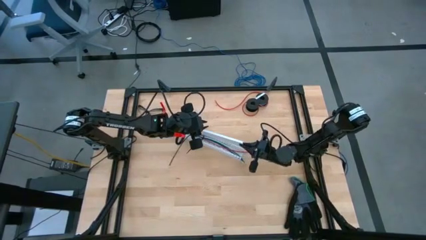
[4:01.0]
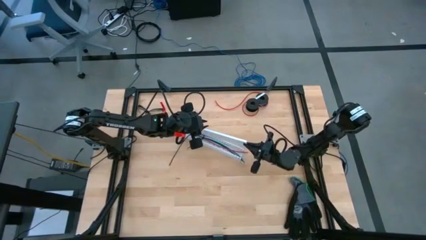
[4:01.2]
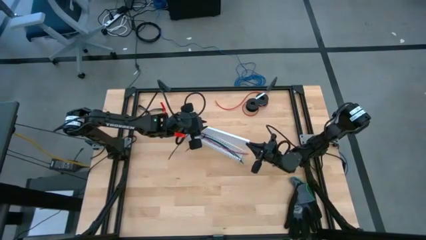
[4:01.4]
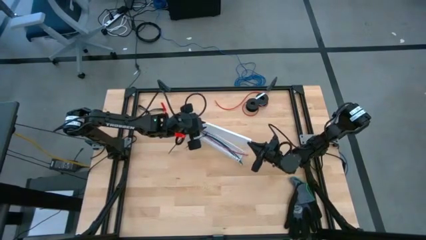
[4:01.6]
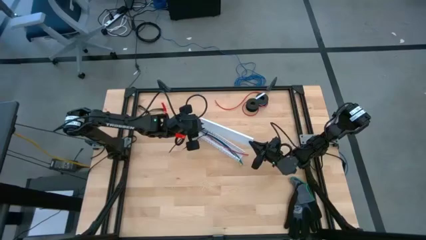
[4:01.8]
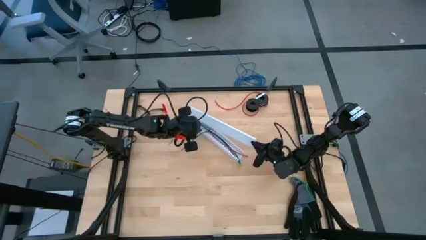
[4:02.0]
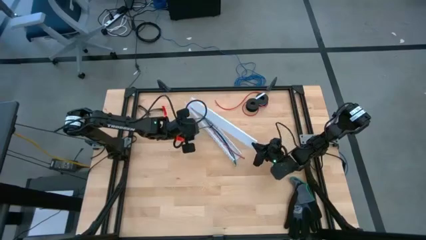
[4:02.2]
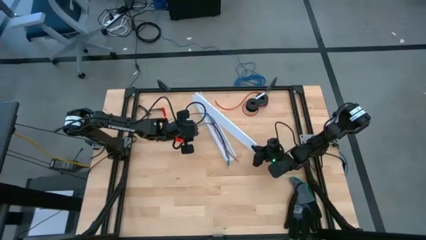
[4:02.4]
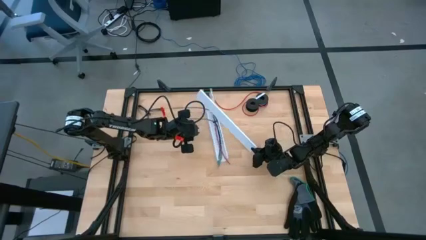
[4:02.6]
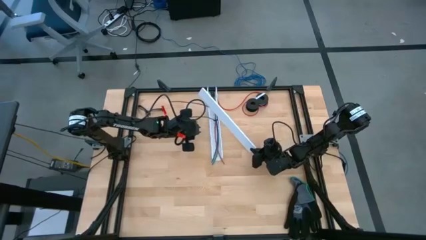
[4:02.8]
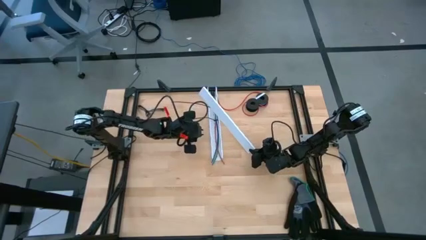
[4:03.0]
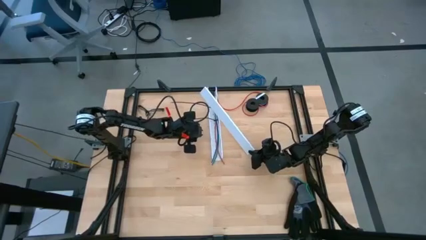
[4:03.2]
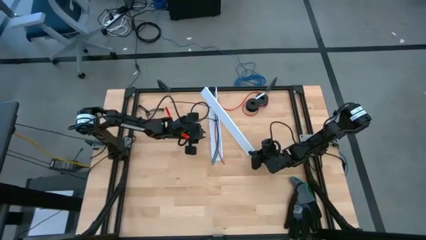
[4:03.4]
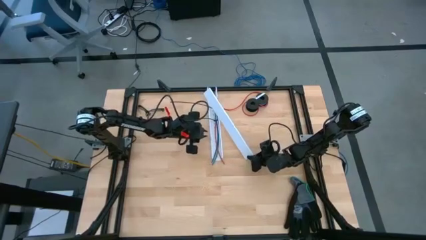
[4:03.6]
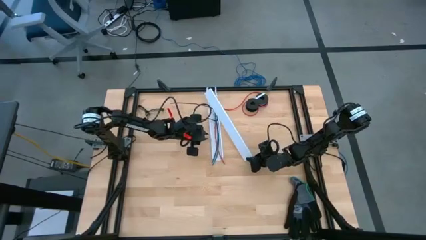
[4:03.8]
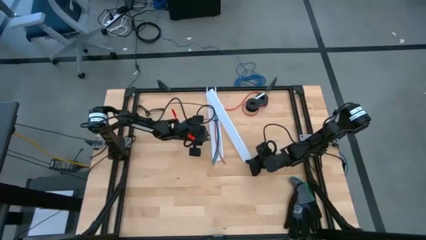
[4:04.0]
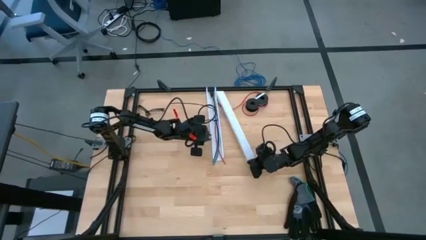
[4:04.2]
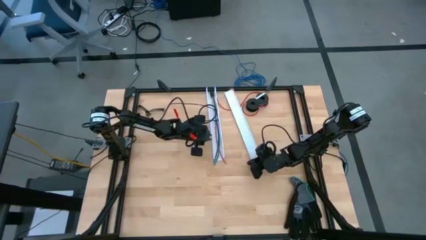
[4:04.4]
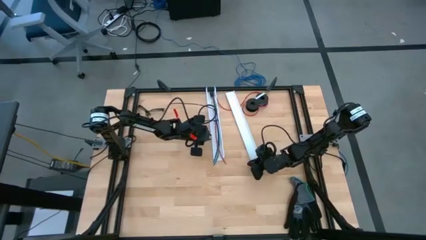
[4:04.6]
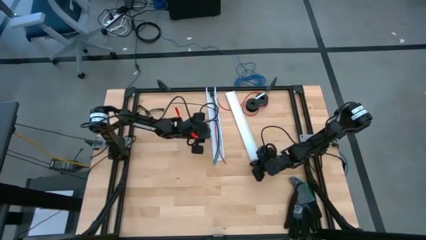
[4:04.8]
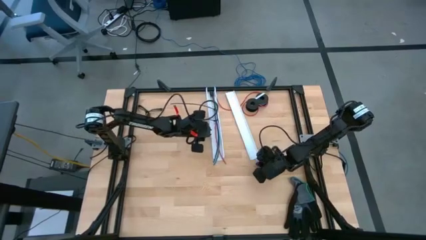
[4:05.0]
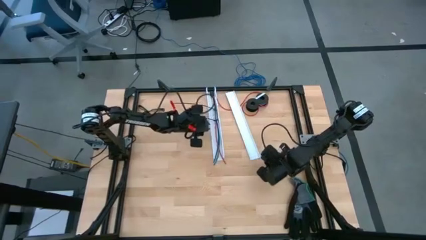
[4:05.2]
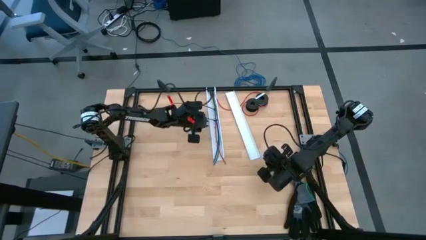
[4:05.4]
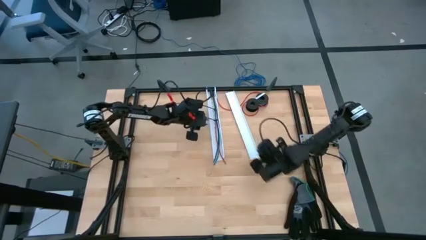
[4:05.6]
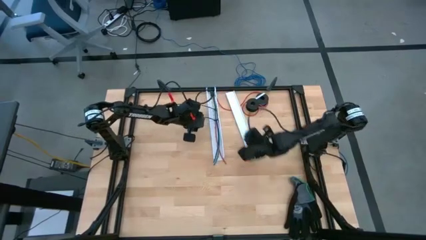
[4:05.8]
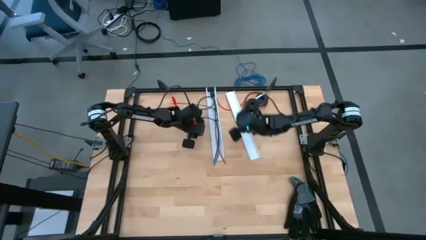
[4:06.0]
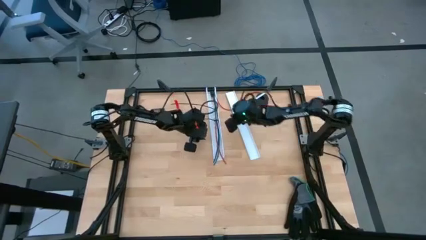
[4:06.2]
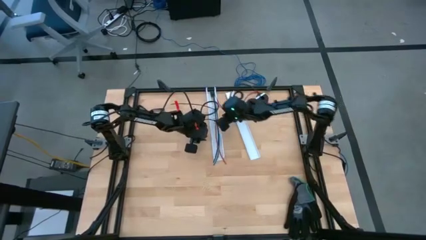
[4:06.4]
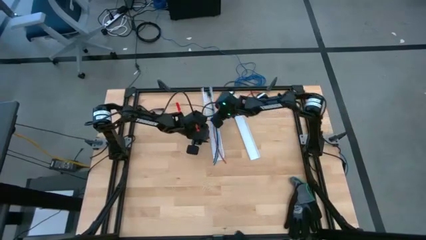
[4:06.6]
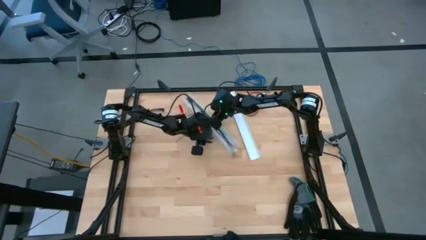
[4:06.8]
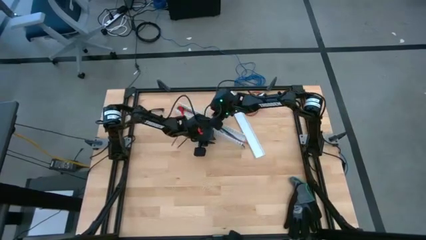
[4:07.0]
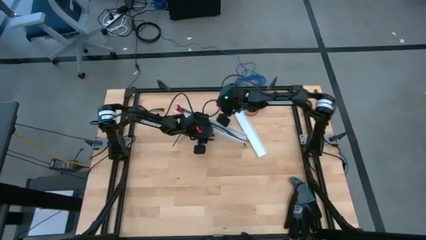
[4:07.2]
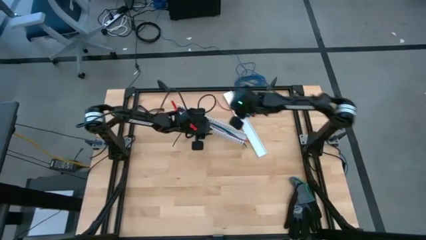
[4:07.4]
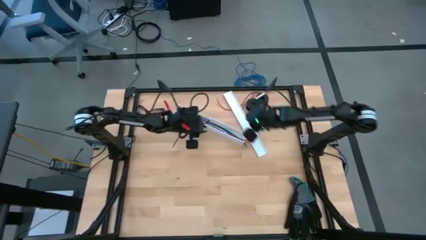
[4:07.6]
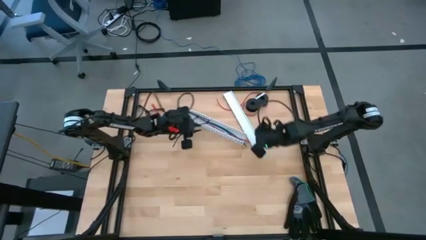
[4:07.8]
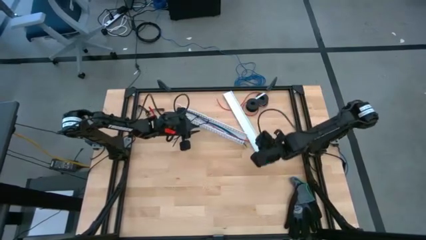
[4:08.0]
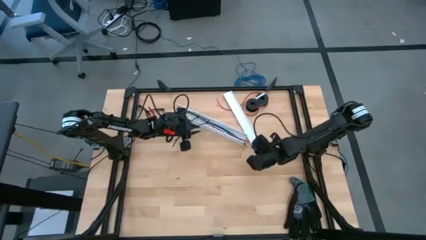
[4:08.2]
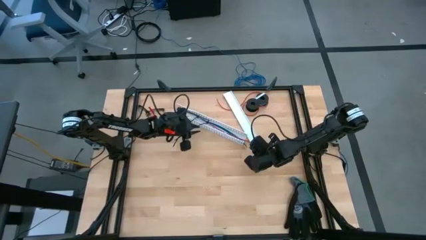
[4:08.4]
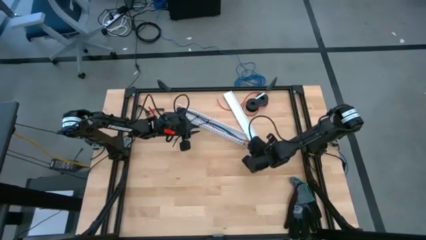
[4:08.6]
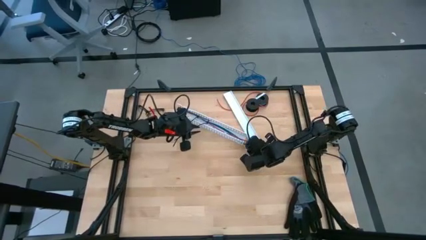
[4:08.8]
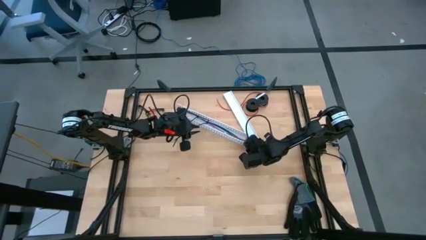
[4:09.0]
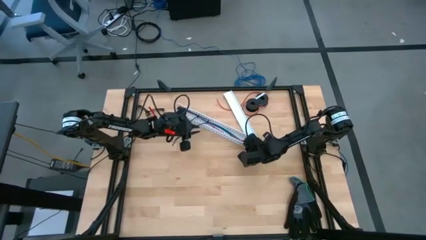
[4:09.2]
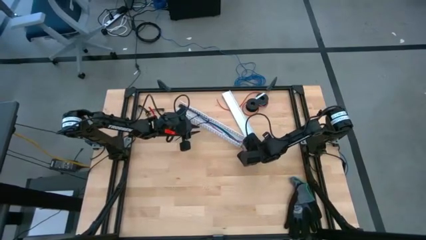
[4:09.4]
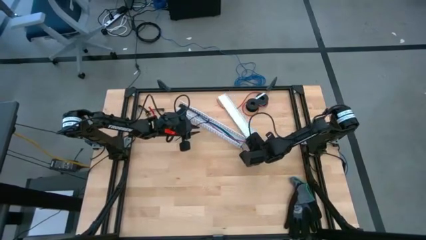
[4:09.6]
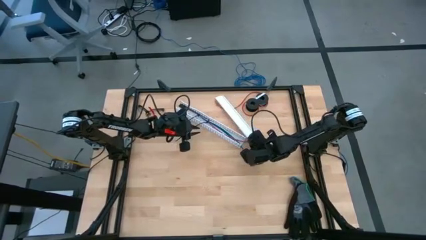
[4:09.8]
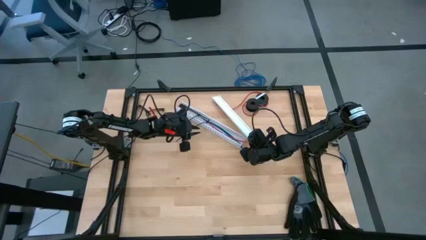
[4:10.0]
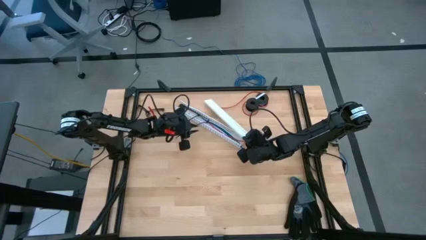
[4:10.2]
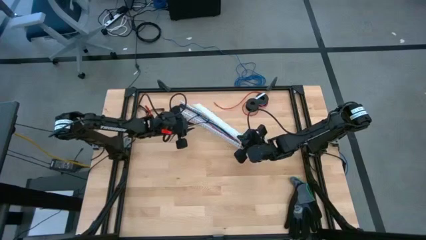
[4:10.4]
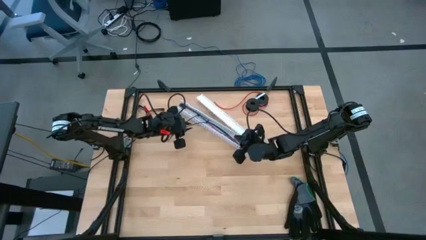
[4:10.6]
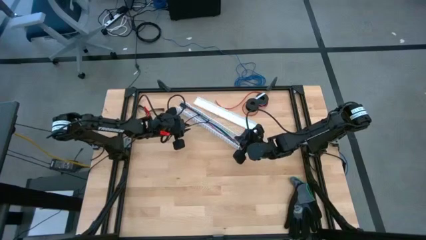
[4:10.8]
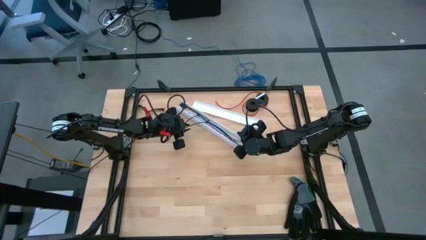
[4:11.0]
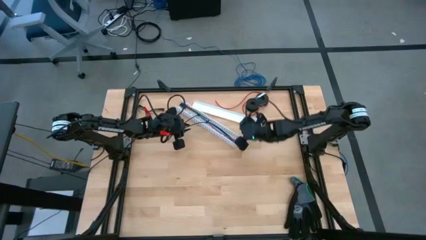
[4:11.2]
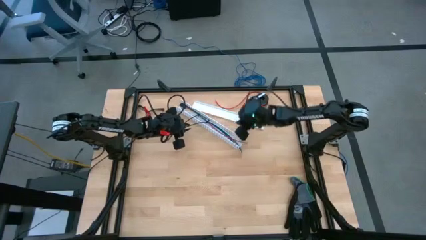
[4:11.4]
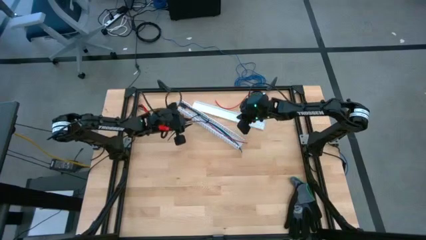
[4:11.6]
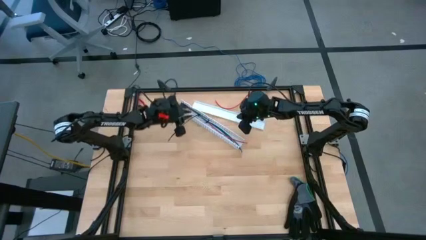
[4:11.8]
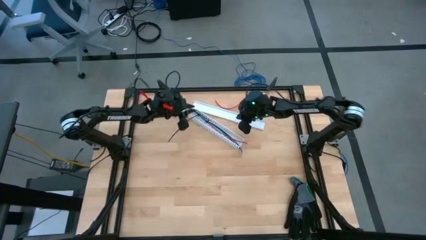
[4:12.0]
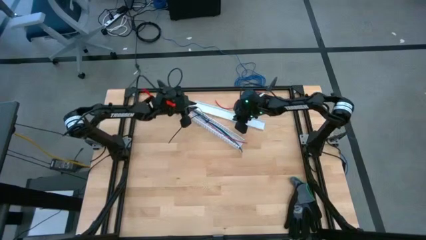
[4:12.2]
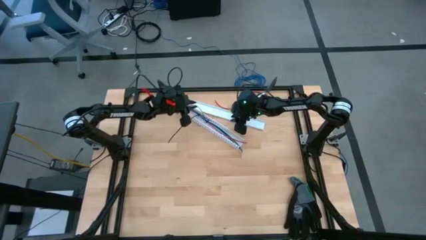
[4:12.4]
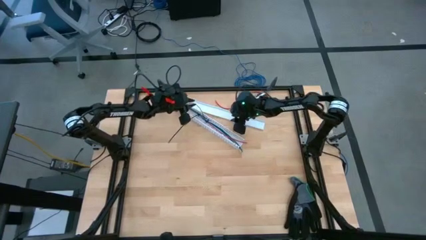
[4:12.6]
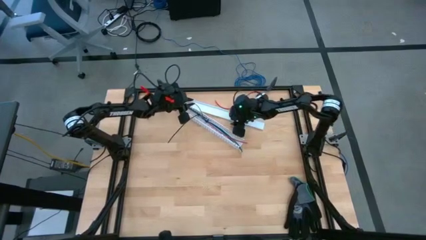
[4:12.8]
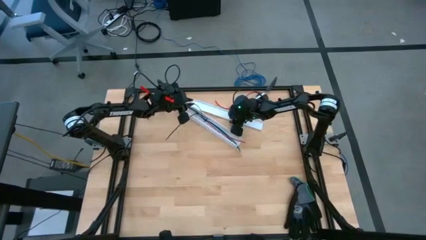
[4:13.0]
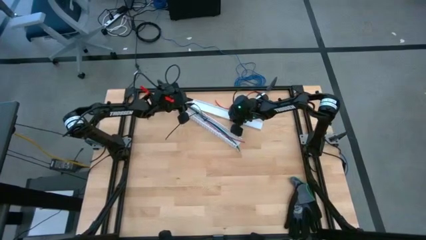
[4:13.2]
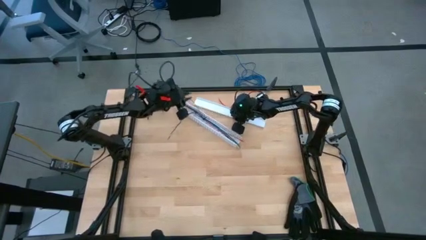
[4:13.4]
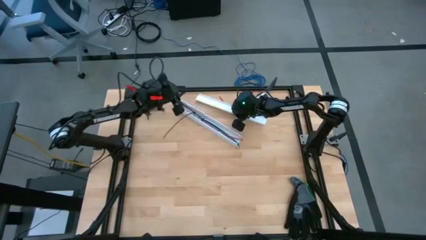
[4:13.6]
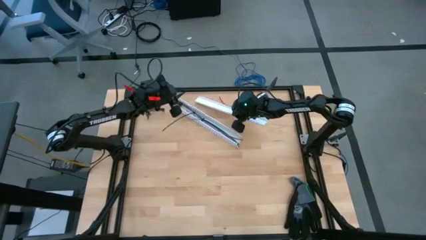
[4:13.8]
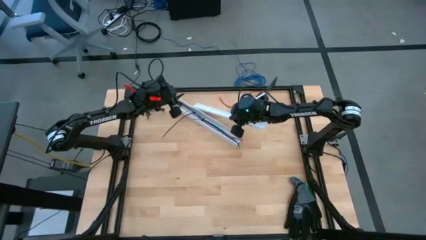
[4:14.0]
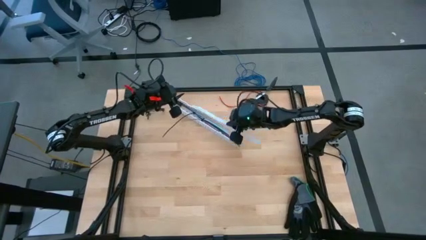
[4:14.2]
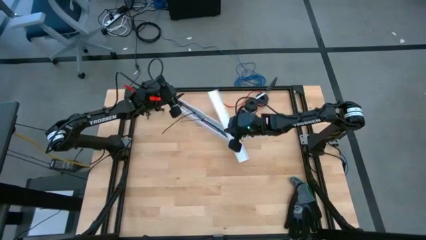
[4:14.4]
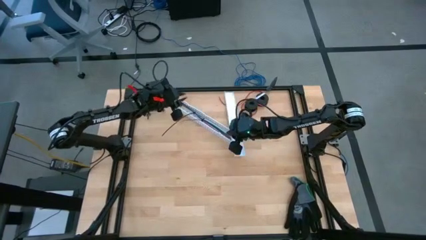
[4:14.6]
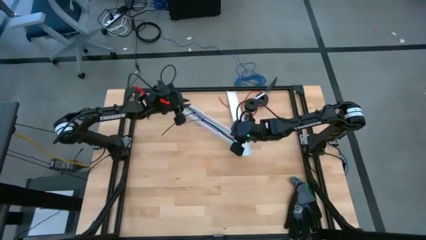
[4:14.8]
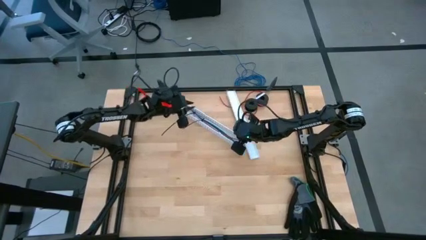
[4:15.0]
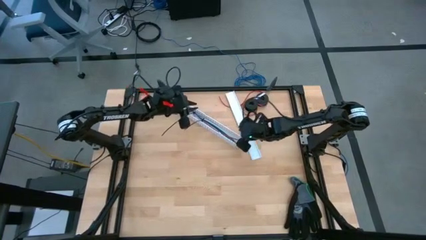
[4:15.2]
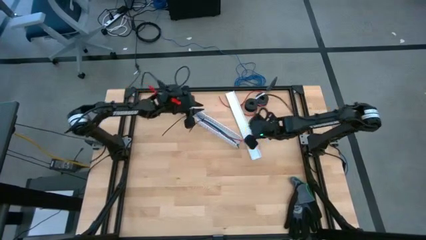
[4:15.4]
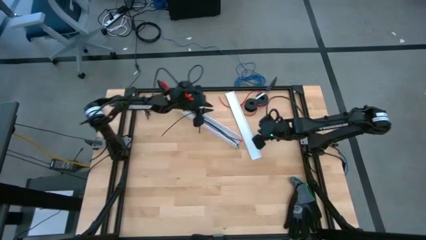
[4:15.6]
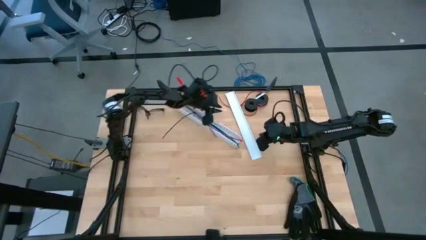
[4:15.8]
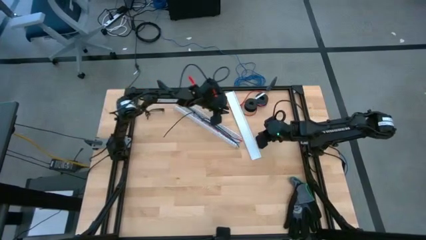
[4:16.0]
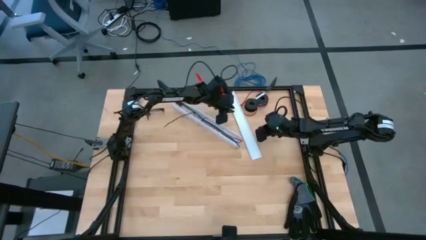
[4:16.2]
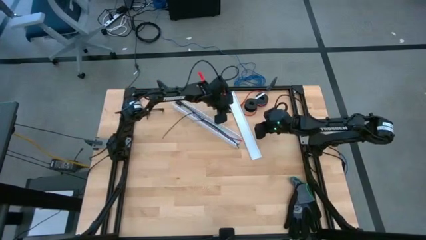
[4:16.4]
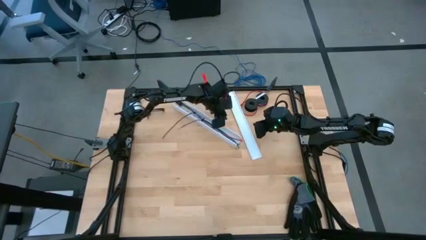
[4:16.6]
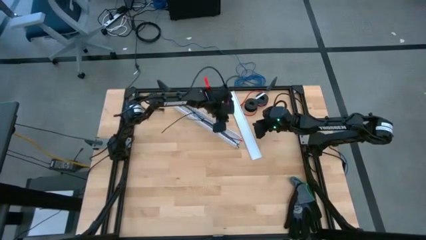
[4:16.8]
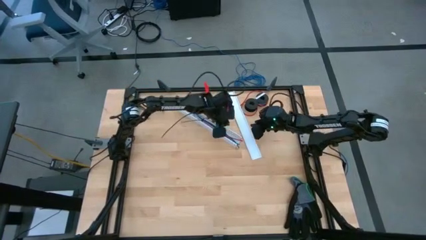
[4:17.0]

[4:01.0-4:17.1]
Task: Ziptie cables
Close the white cable duct
